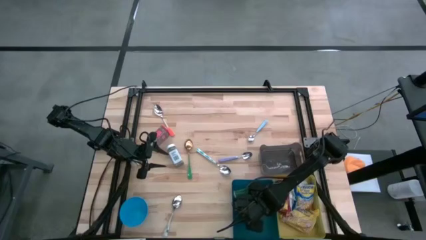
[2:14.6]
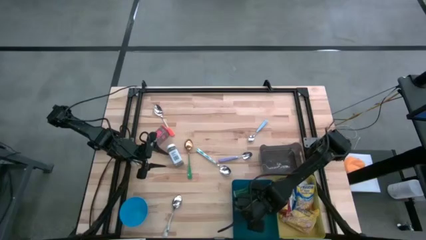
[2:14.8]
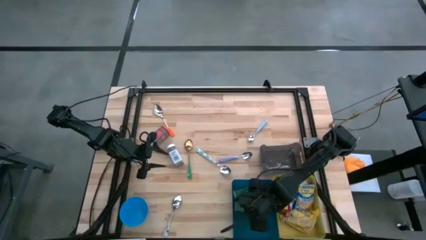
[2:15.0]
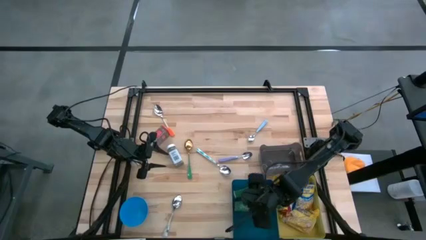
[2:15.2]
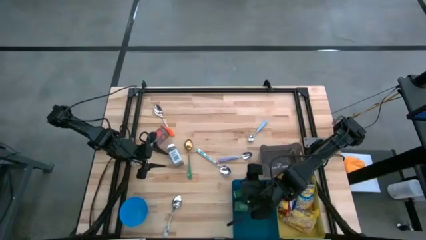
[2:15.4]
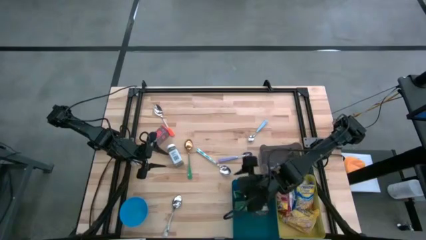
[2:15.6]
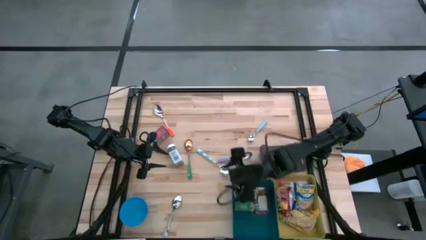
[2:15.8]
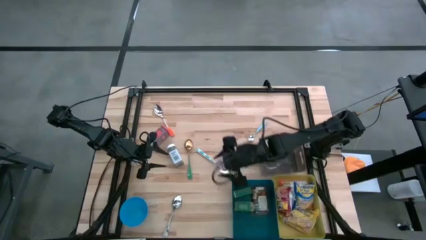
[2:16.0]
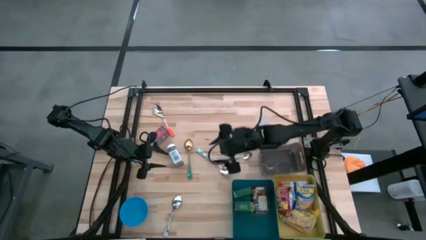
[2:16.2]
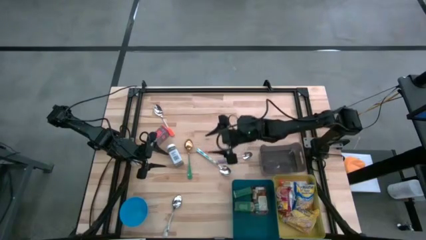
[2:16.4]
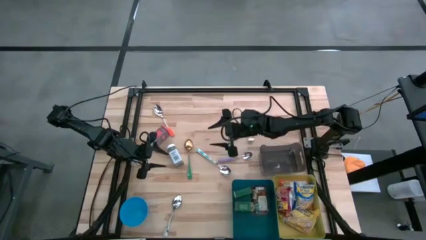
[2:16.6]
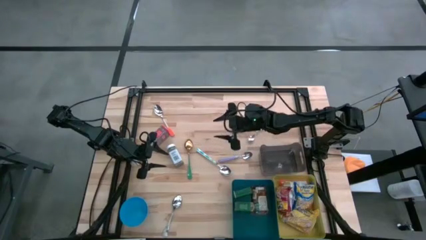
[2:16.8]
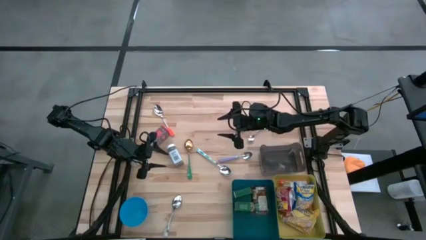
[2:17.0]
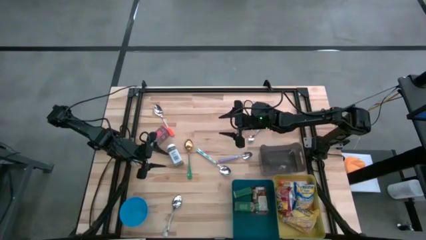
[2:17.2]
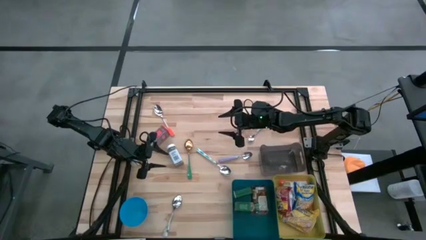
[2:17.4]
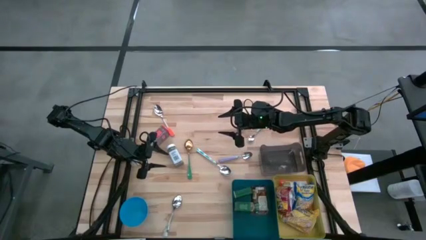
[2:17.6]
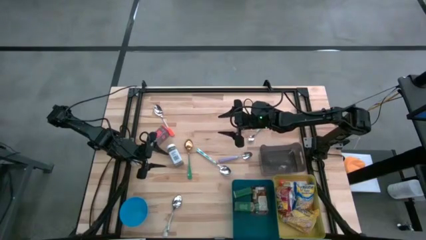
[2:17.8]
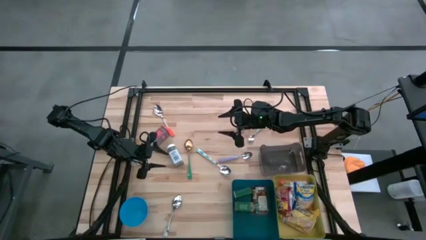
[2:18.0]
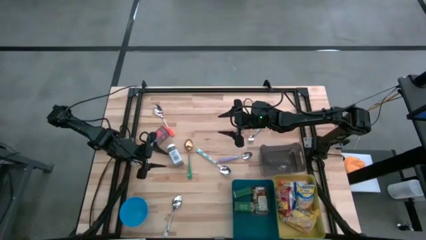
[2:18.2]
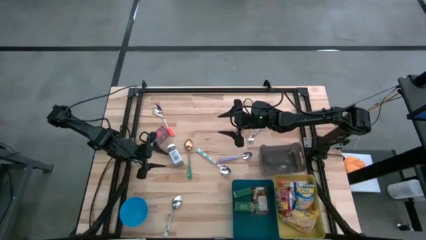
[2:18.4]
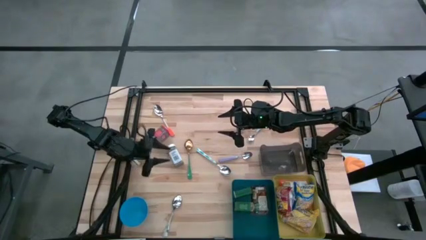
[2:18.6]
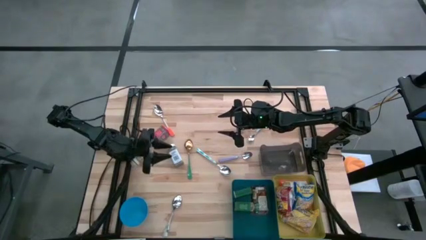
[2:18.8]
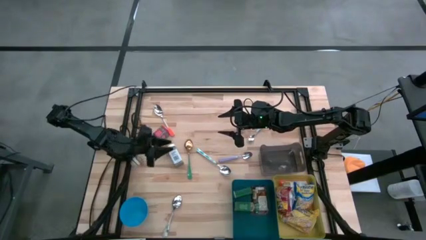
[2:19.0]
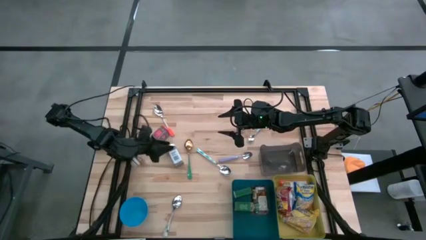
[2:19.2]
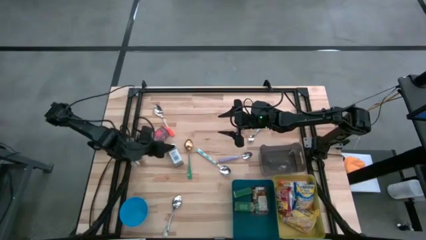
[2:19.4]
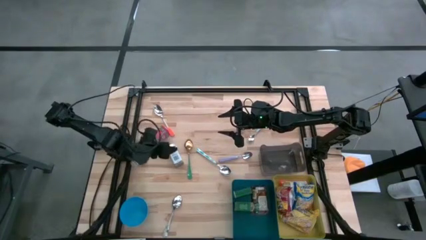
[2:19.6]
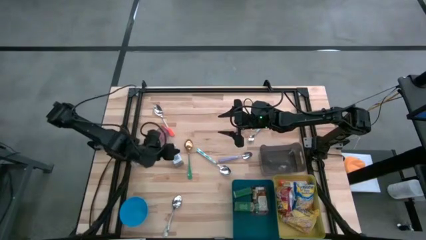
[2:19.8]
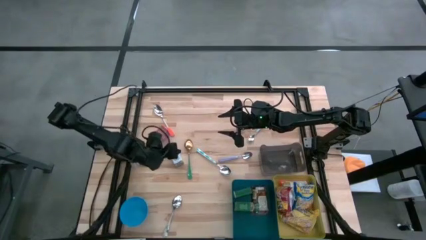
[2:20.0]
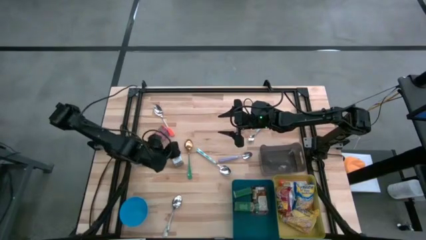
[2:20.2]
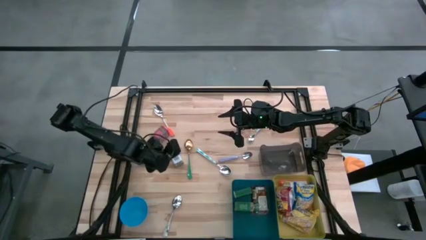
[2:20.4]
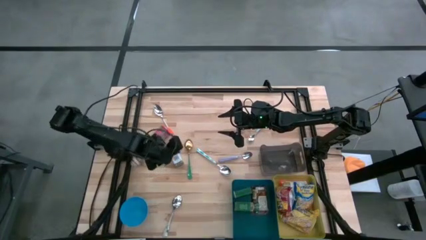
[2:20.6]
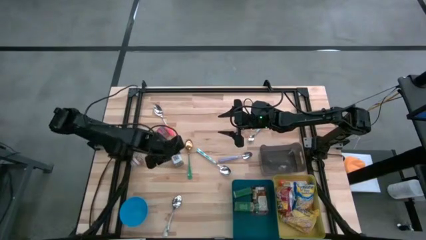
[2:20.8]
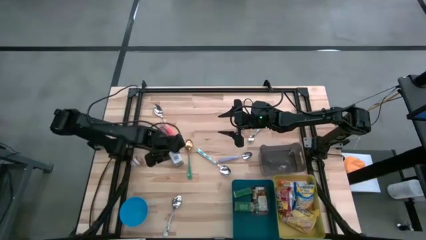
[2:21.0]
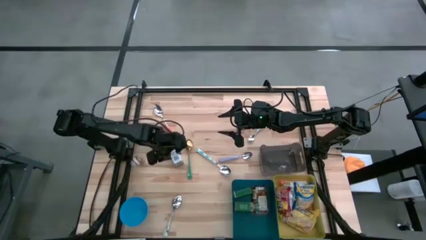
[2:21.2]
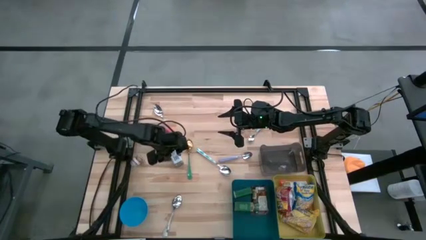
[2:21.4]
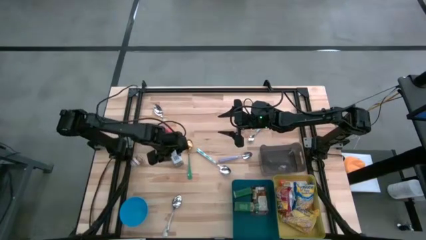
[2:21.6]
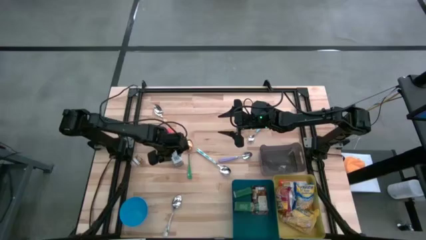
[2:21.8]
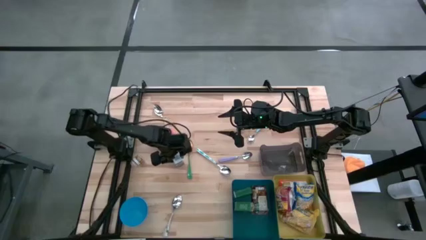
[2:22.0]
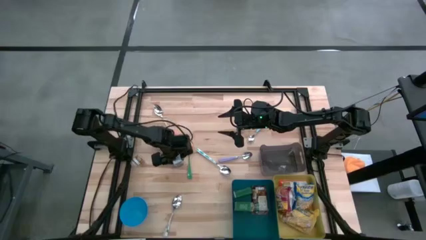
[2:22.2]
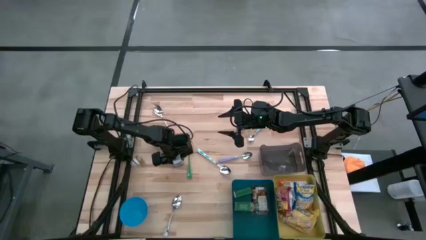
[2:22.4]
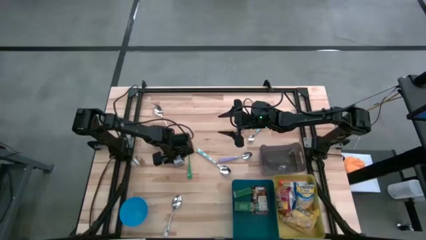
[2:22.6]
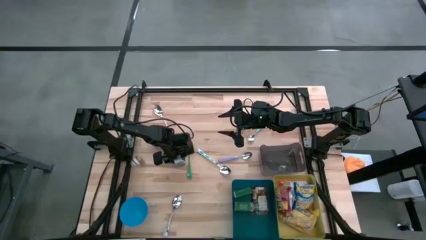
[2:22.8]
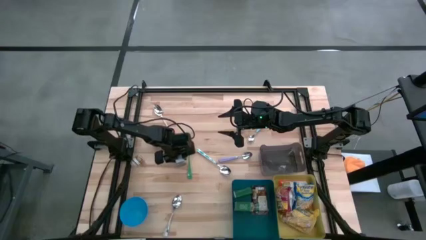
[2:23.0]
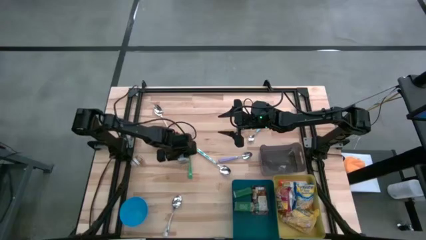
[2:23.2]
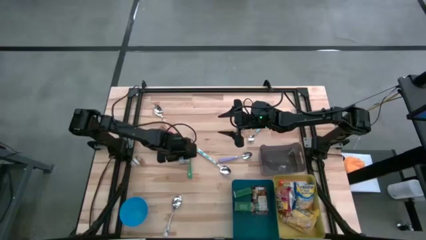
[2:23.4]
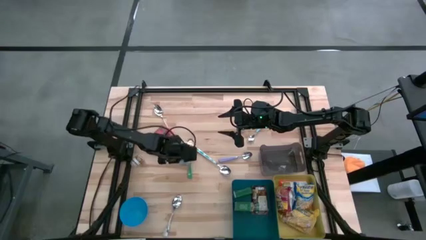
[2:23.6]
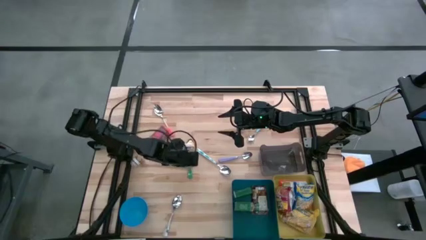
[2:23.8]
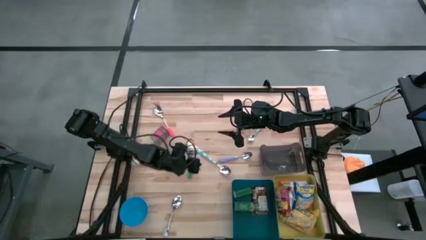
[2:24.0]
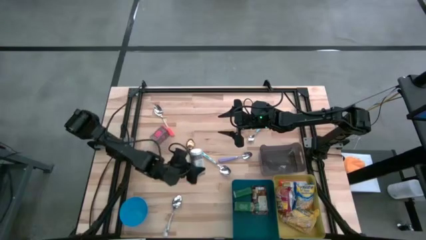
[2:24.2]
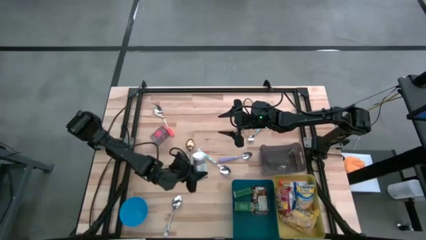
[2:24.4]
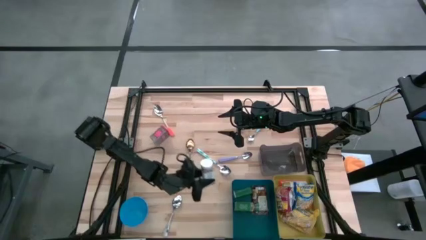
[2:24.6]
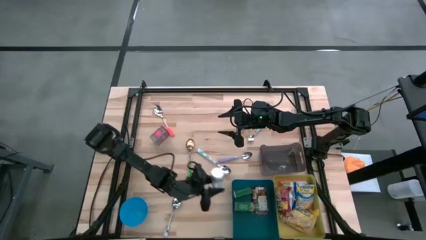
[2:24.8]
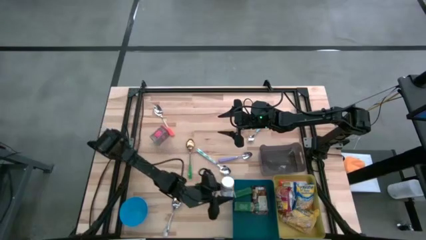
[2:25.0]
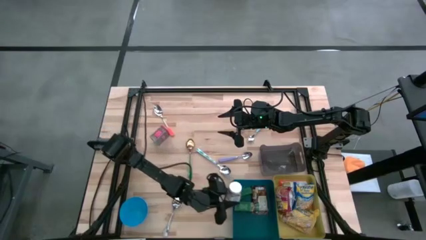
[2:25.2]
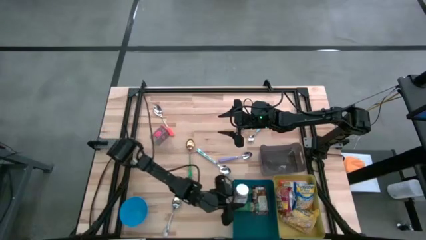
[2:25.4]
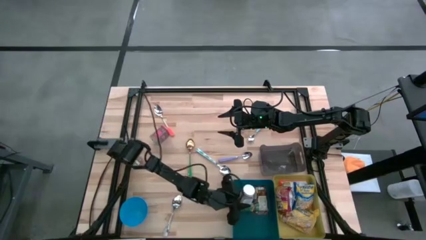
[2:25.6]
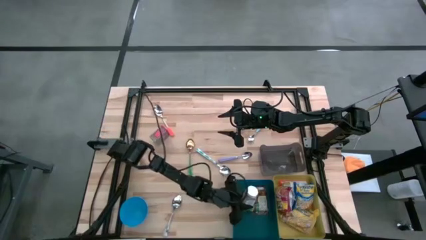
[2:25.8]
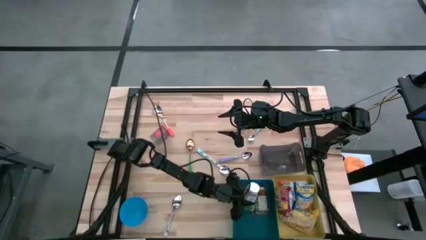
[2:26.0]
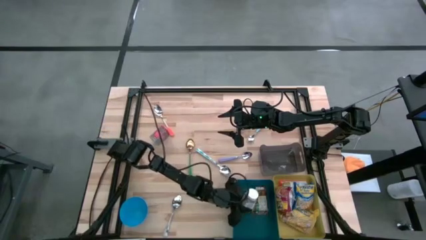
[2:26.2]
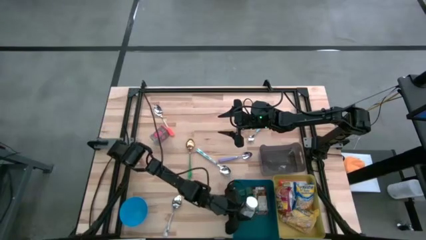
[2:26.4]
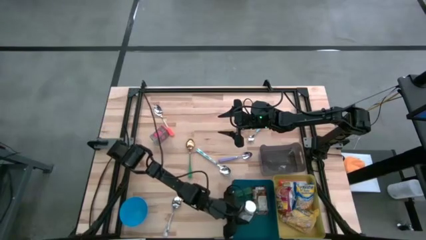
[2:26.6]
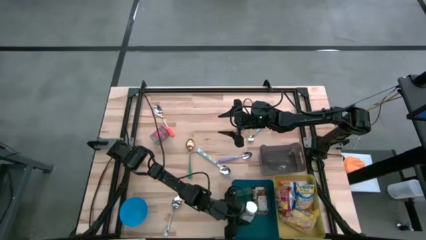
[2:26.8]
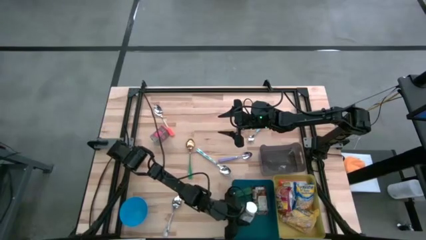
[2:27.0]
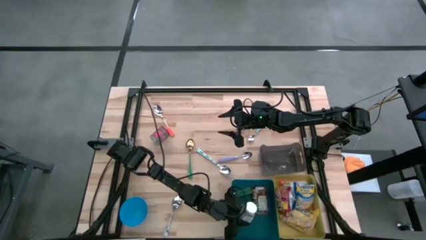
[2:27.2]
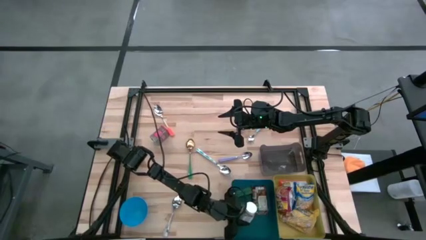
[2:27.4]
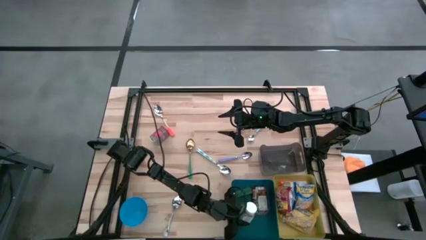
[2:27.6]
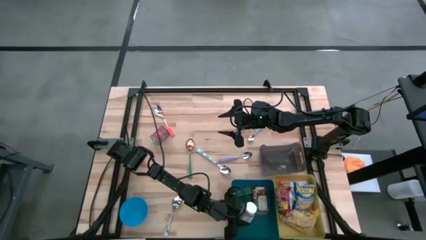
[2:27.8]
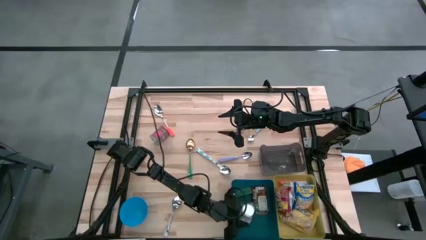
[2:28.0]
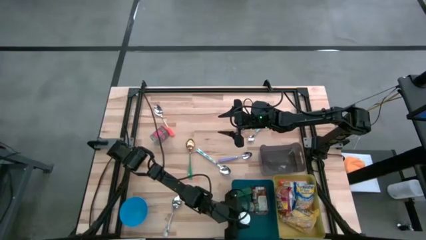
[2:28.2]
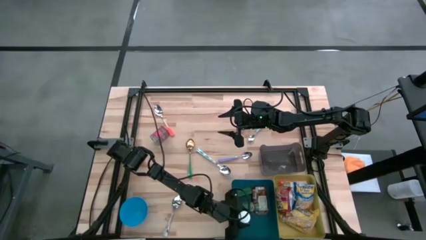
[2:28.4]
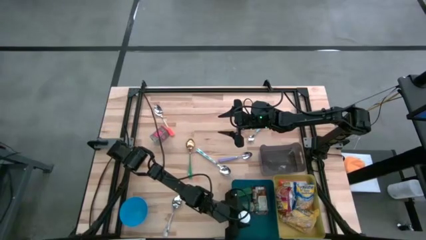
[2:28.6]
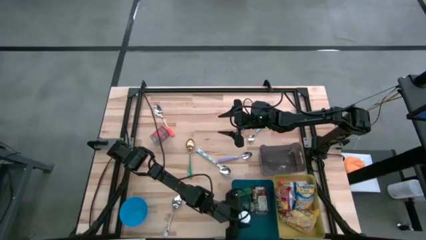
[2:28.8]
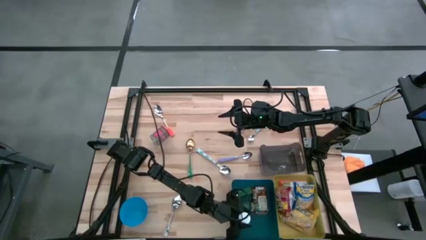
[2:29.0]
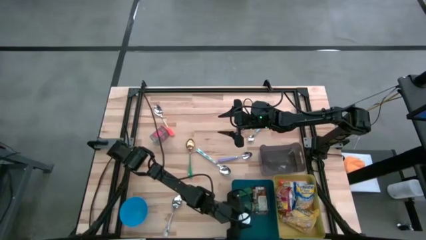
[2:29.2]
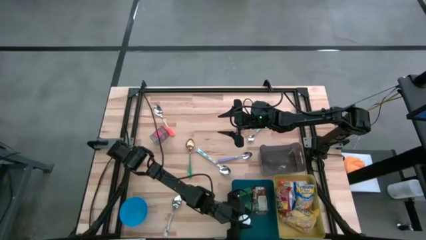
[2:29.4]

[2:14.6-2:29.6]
Put the white seasoning bottle into the blue bin
